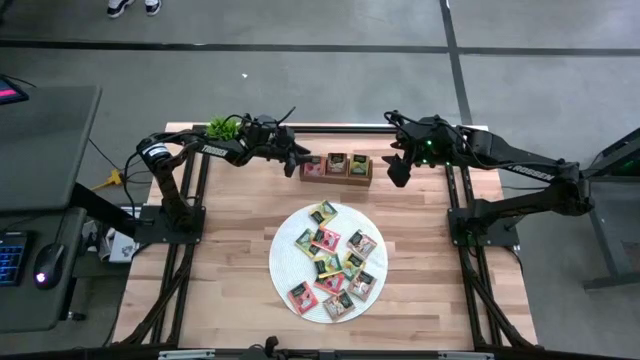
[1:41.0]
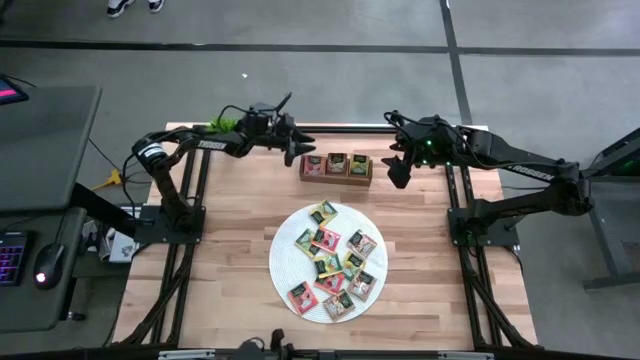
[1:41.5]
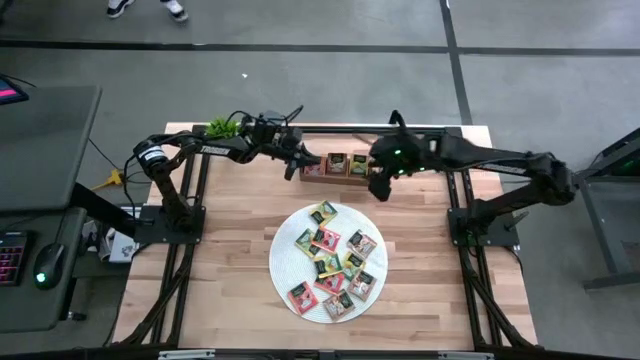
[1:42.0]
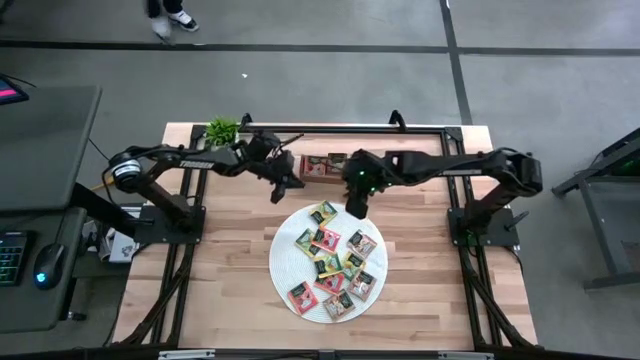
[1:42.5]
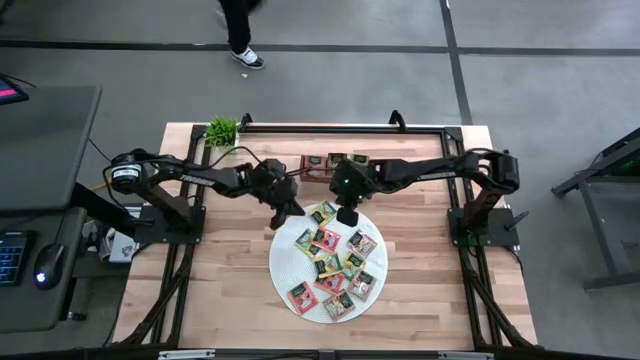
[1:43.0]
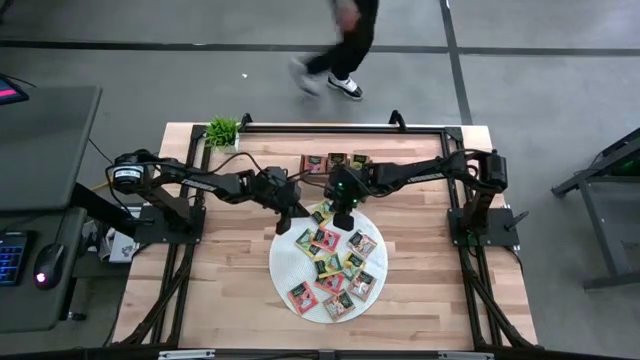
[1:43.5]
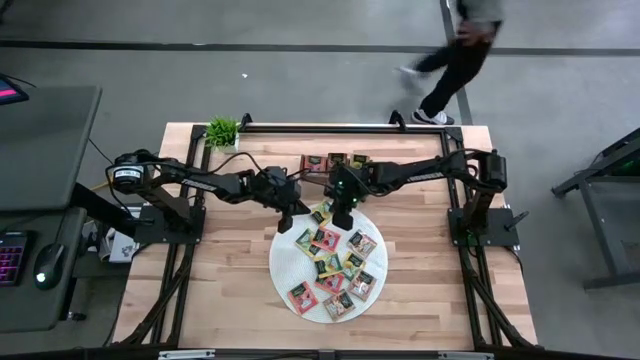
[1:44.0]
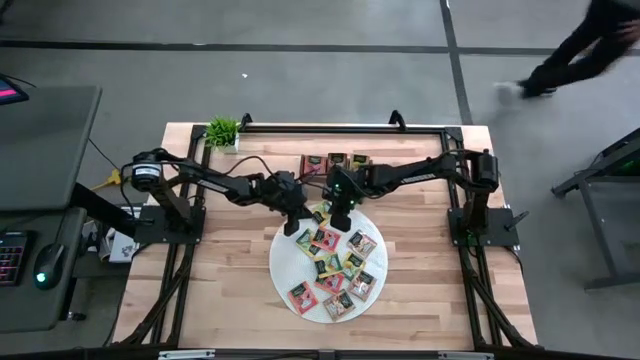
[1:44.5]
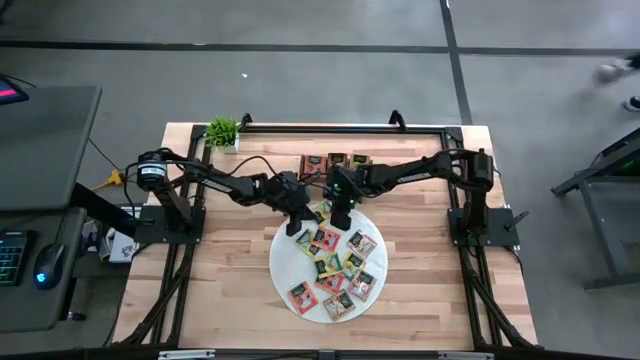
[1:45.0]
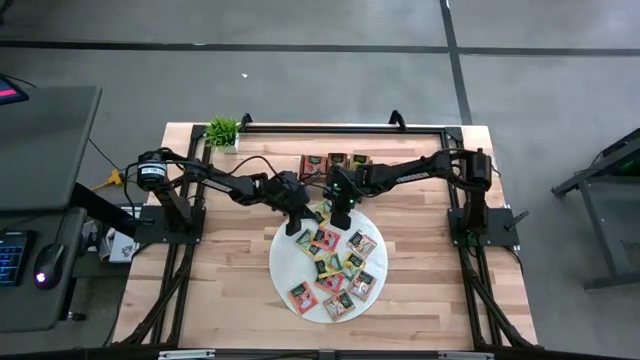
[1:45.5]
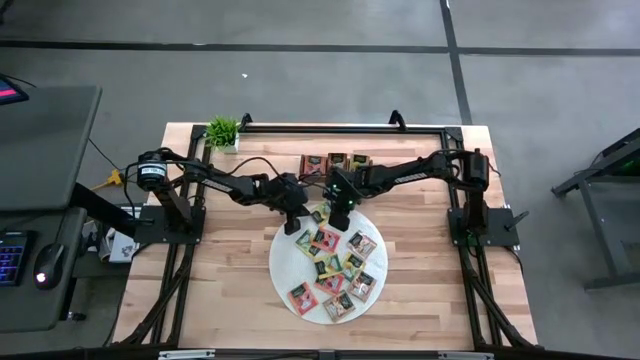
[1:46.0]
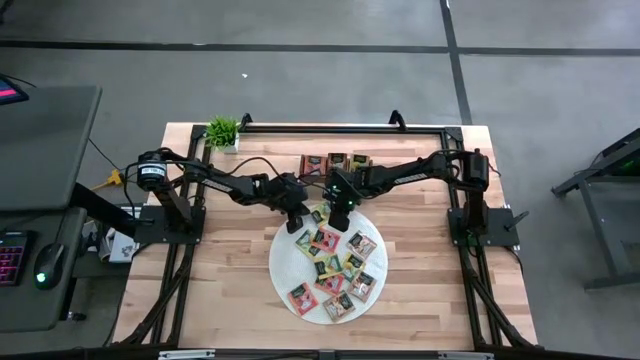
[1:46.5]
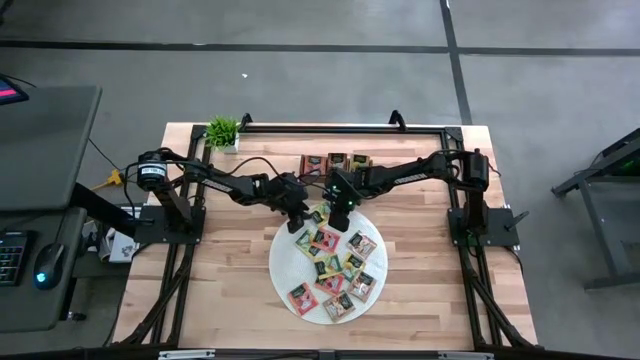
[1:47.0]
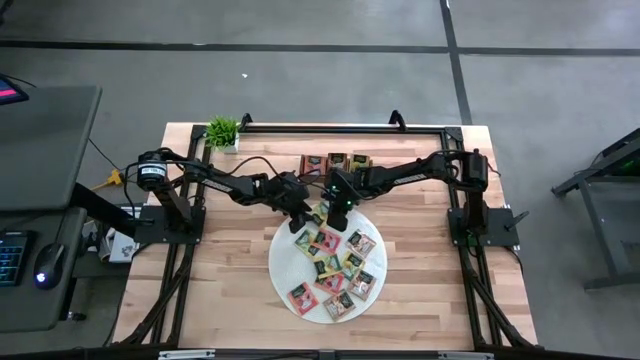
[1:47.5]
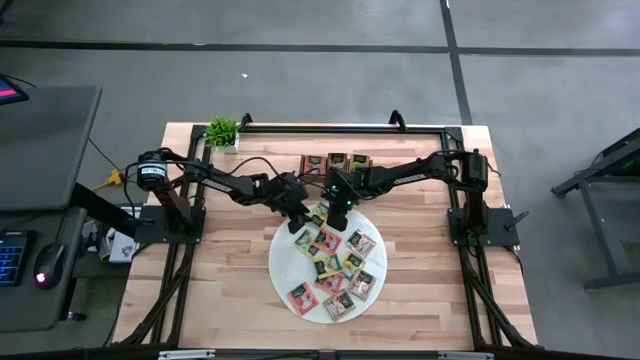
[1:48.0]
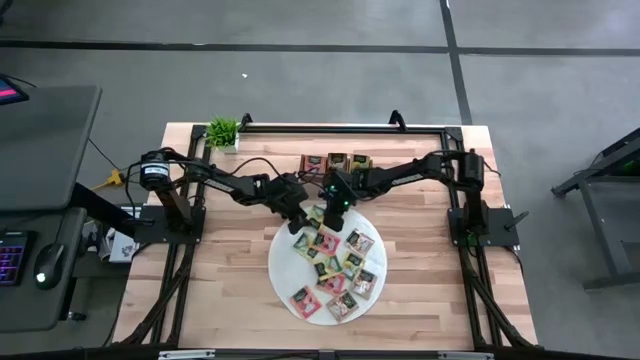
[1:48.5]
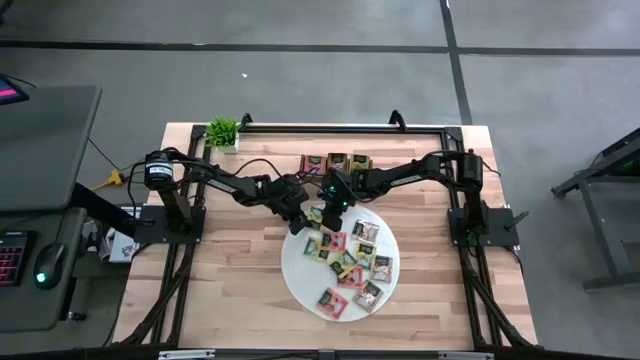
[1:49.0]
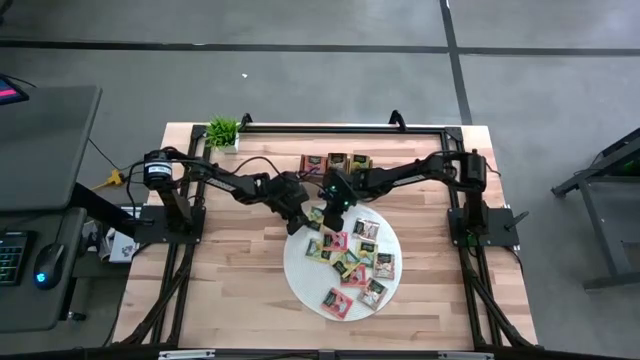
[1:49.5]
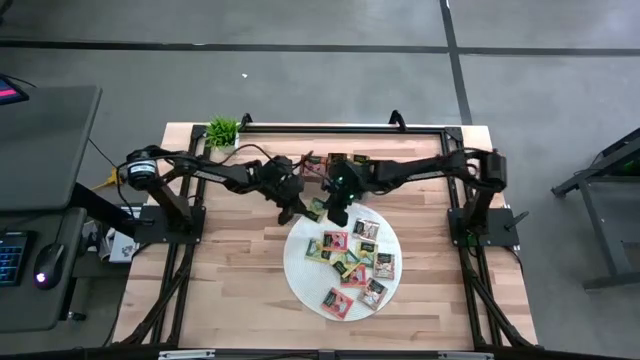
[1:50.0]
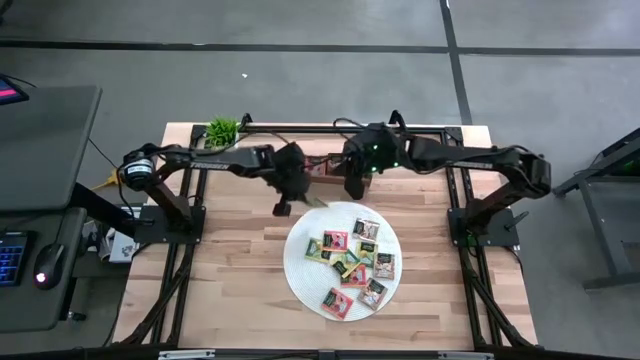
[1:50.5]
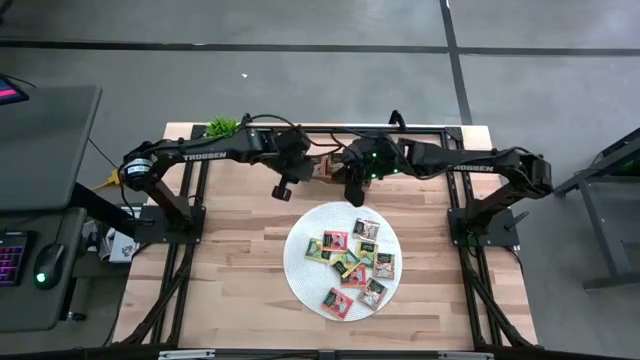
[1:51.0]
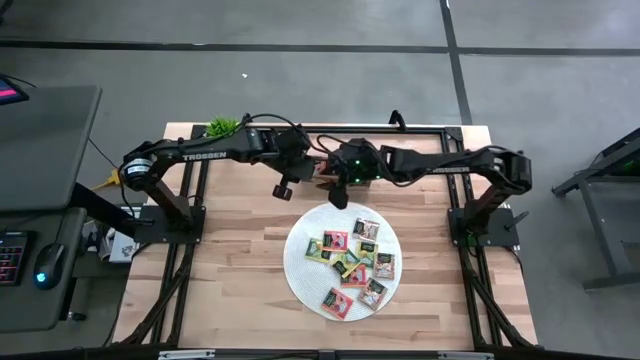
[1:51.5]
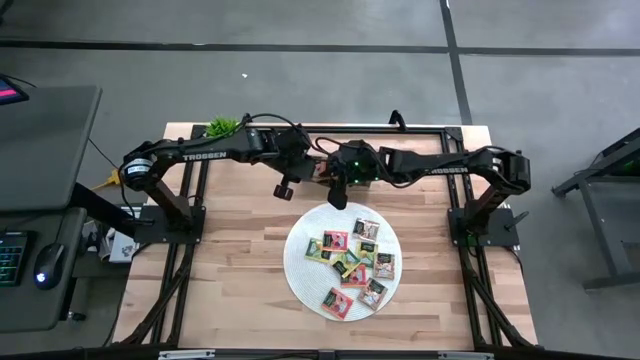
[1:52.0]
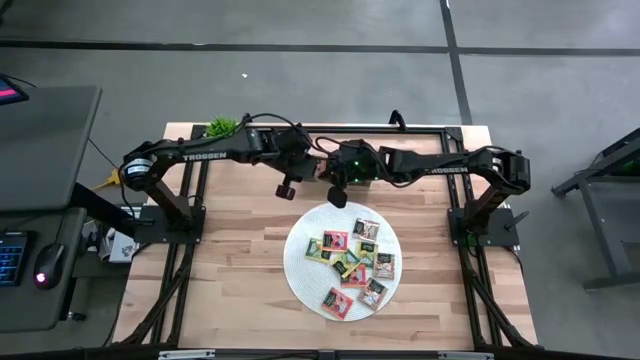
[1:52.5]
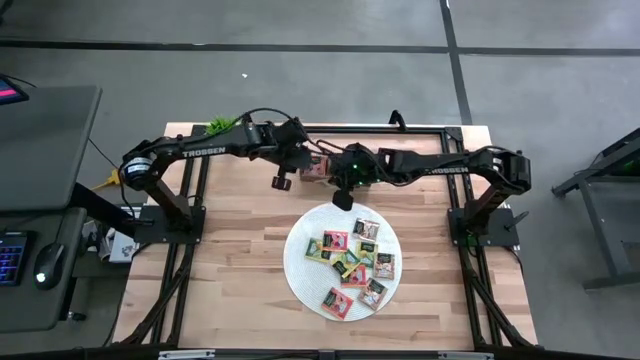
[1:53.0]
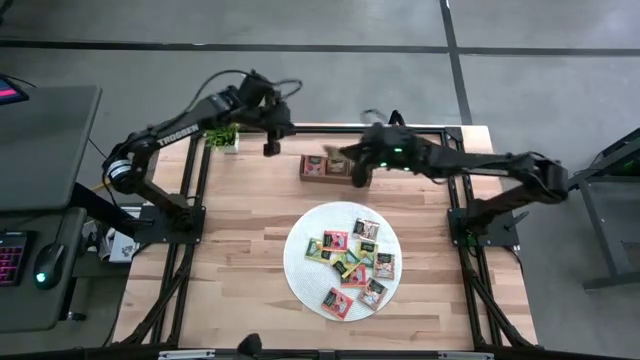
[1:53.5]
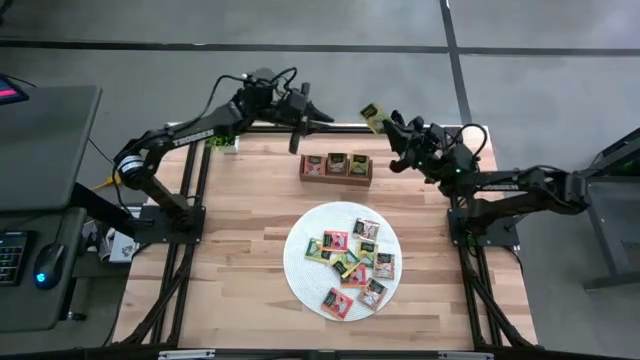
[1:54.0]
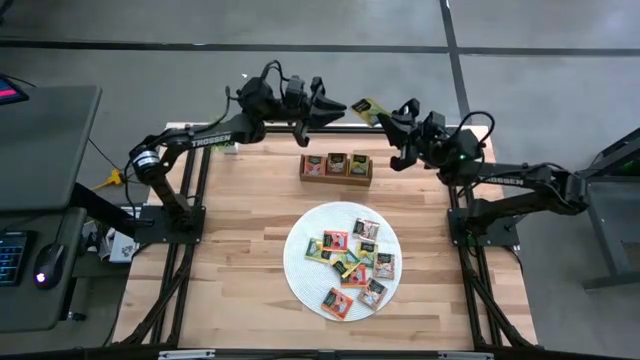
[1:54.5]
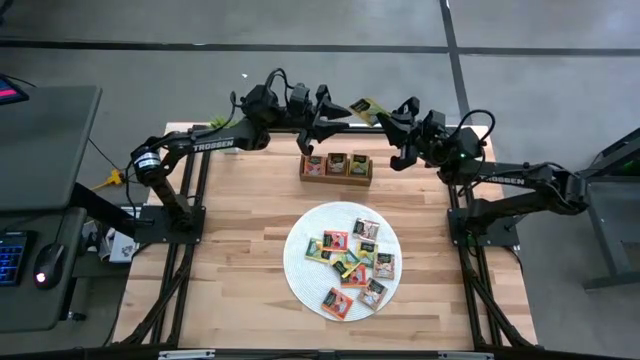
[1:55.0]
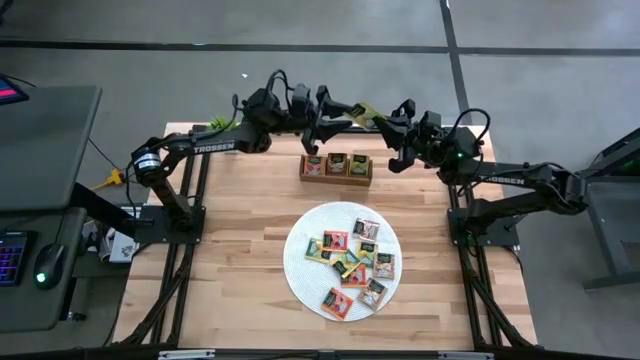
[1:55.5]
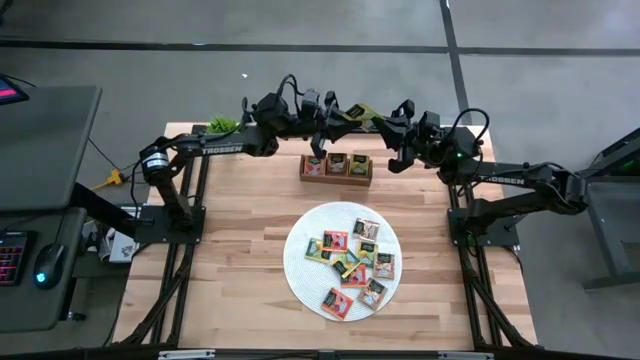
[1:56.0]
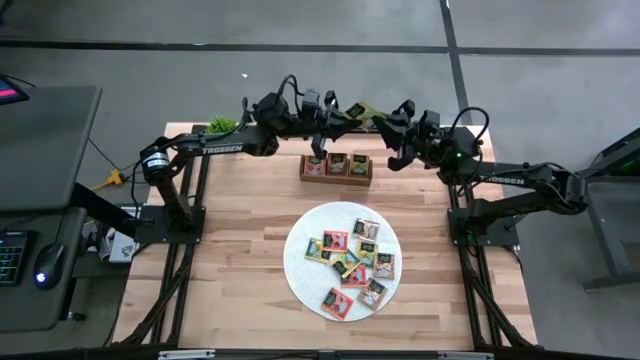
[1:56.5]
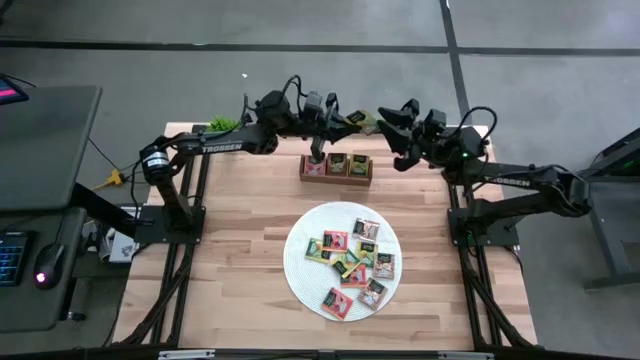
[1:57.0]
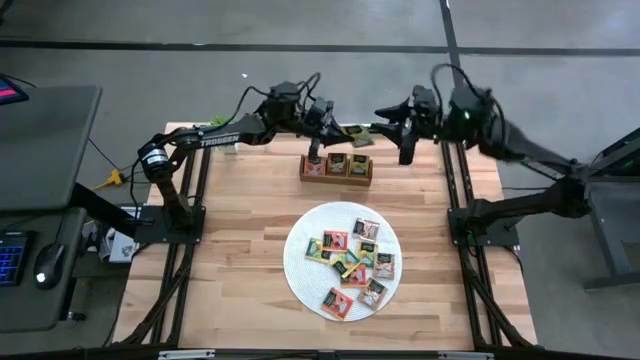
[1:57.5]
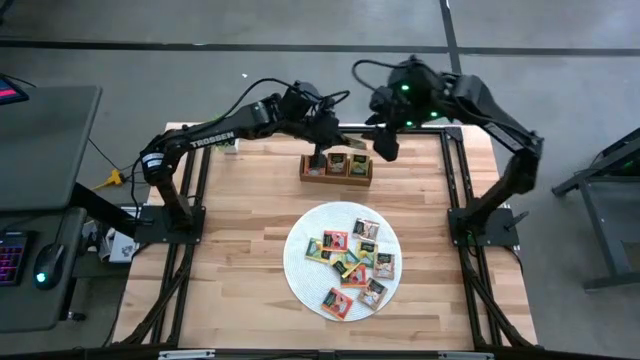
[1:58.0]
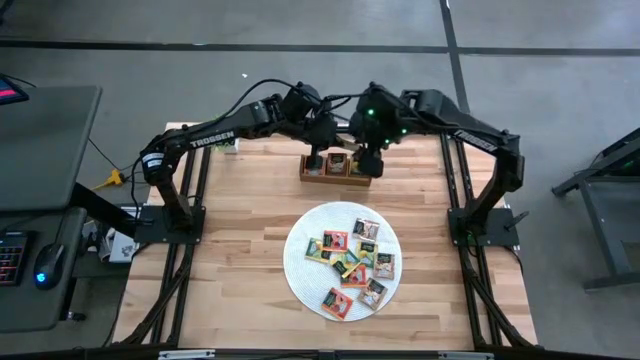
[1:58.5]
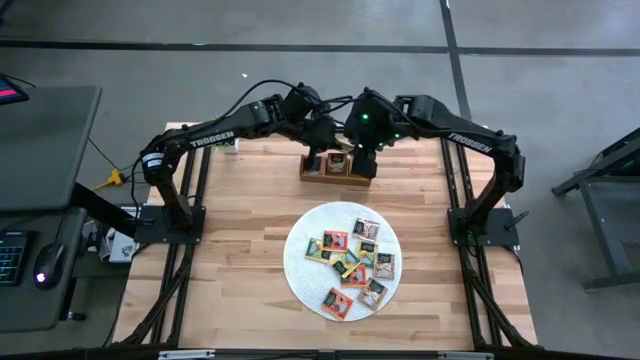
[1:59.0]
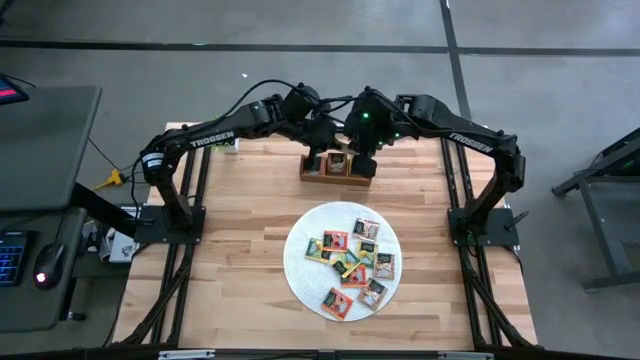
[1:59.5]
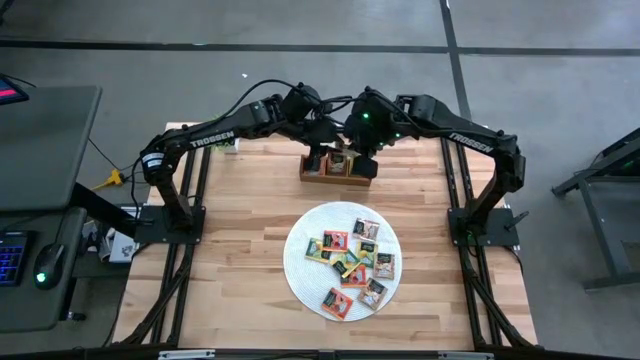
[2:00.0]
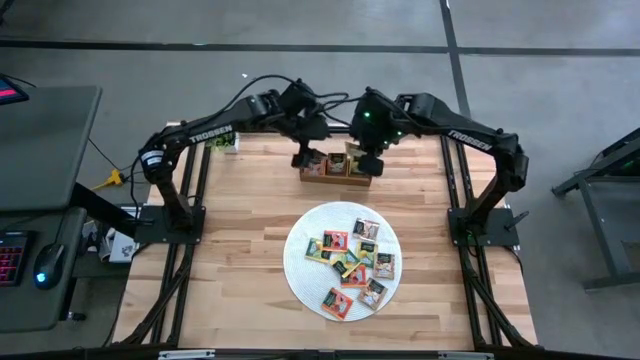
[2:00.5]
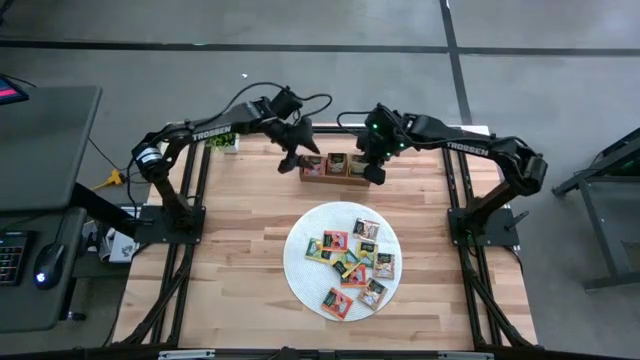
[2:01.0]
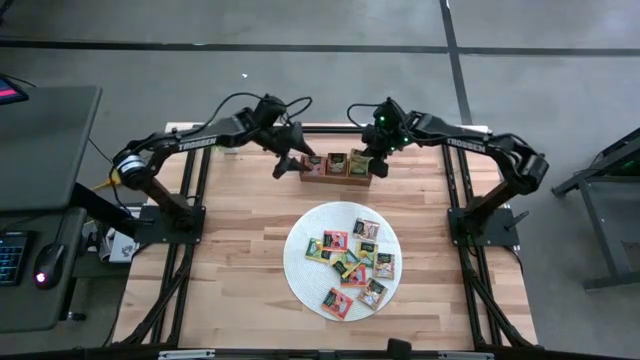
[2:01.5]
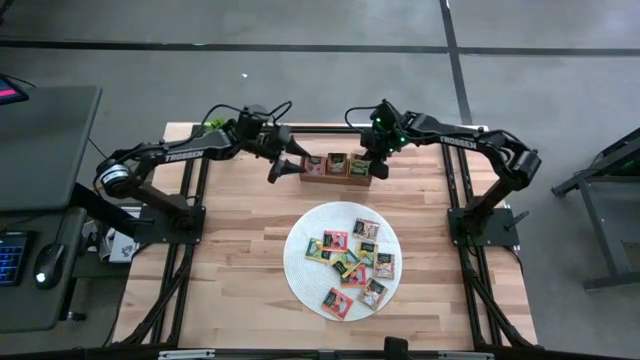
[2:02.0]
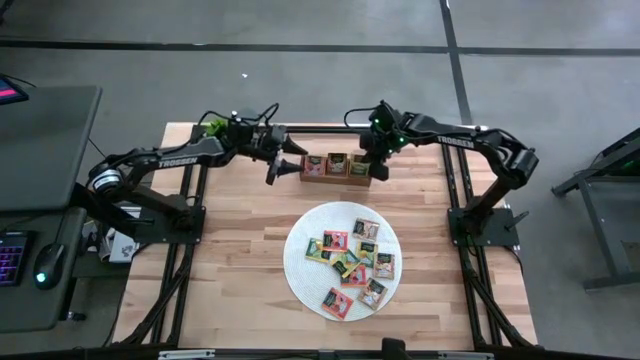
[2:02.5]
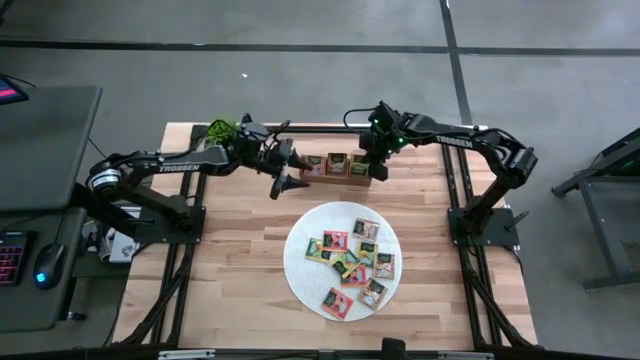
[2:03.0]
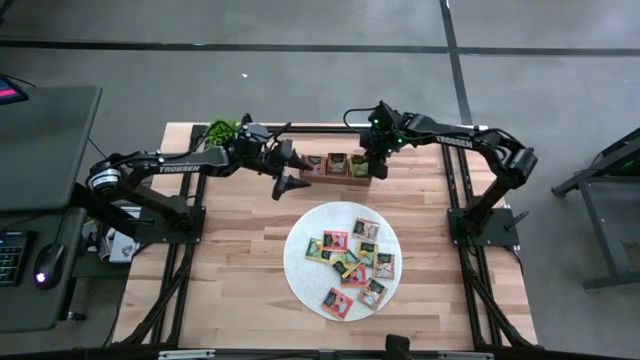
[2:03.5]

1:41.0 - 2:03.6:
Task: Pick & Place Tea
Put the yellow tea bag into the right section of the wooden organizer
